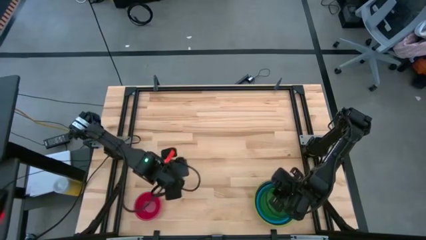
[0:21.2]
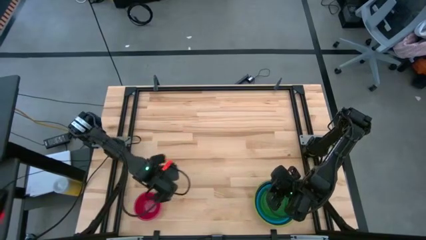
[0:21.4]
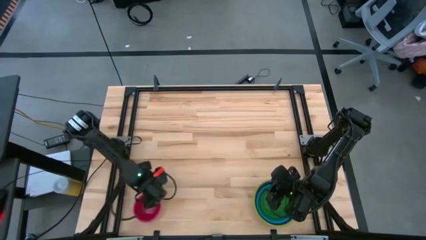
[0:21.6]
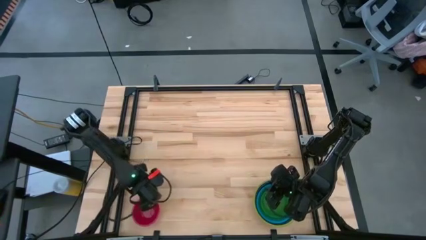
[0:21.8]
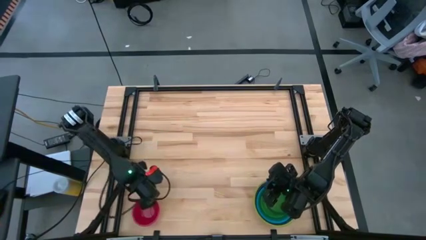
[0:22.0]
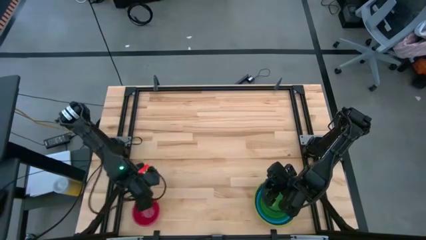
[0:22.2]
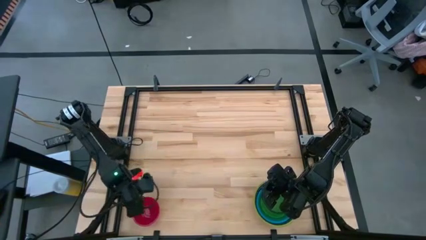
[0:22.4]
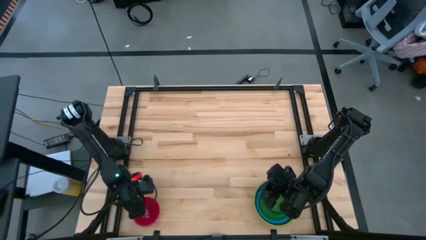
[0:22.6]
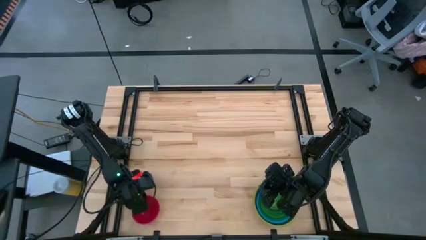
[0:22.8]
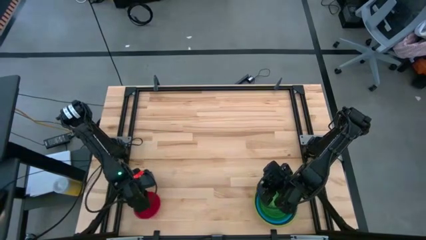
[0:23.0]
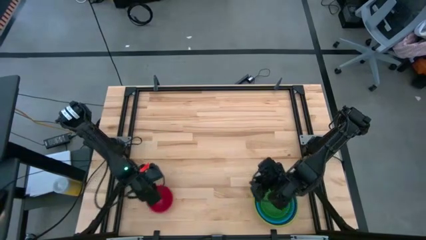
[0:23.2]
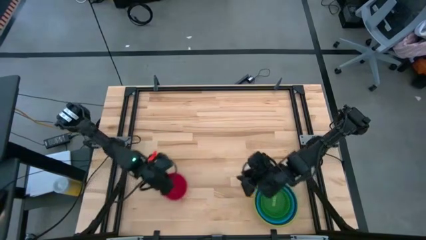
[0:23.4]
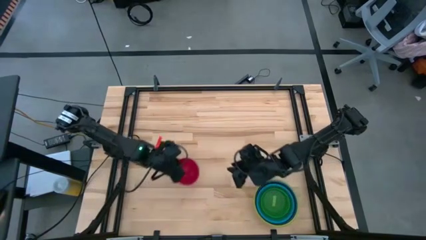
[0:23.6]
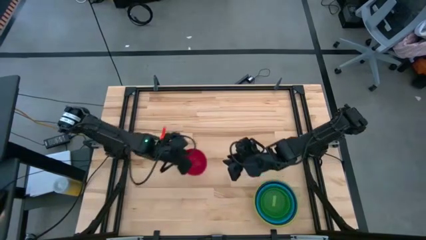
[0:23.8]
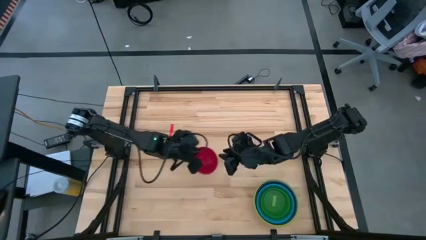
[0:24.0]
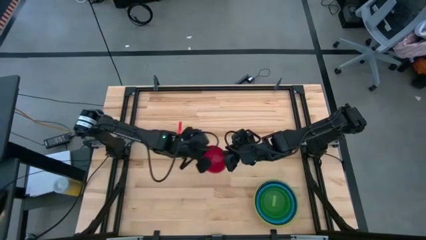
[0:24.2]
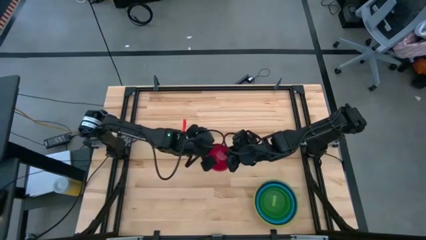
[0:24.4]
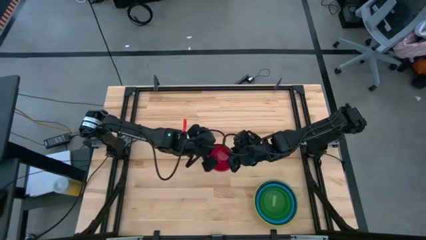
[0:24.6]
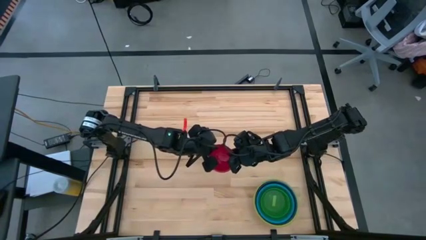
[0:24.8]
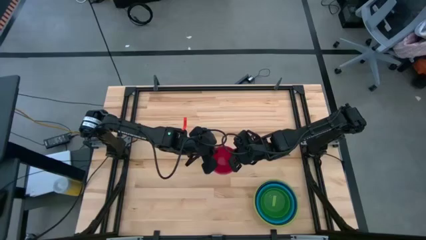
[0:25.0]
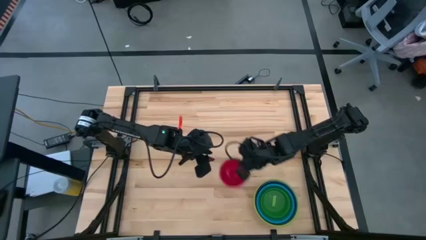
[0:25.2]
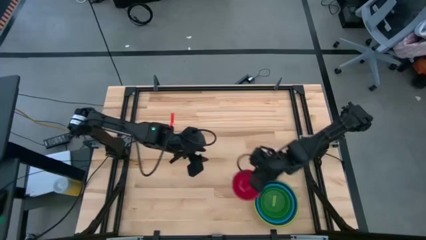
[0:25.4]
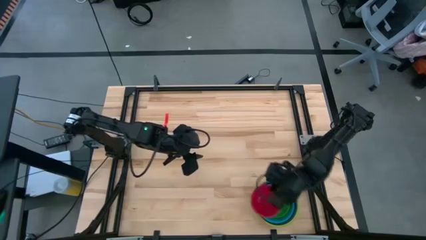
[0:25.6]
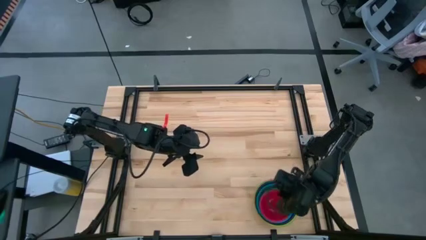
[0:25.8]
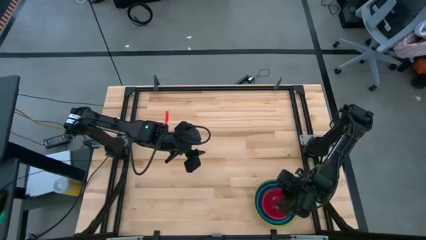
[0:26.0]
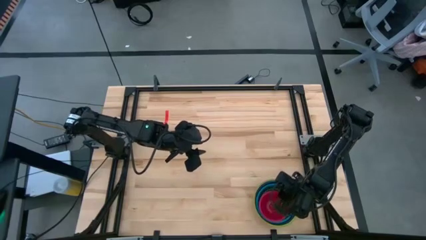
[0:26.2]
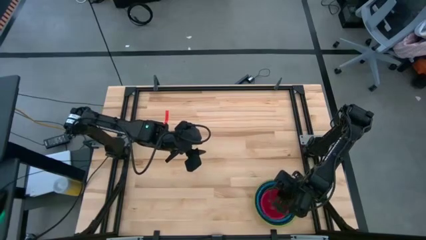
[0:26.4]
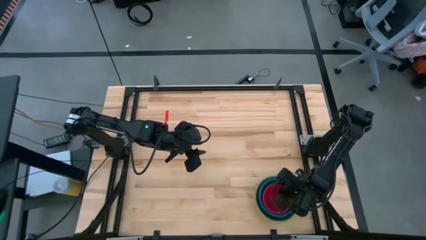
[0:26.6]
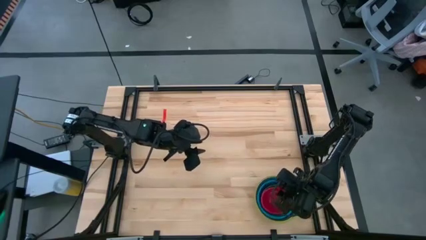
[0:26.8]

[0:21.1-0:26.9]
Stack the red bowl on top of the green bowl

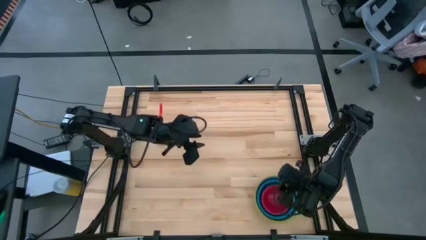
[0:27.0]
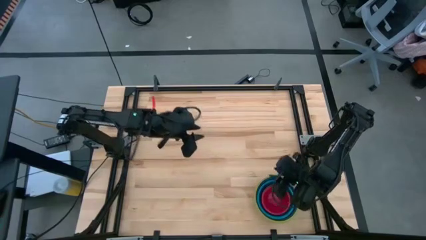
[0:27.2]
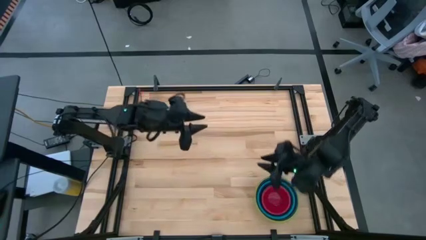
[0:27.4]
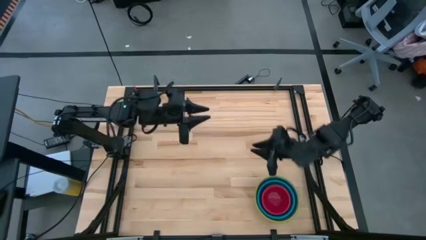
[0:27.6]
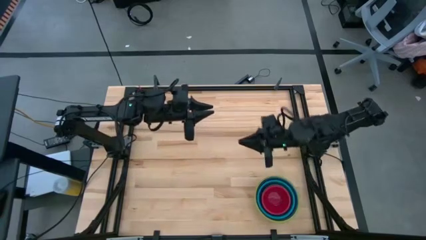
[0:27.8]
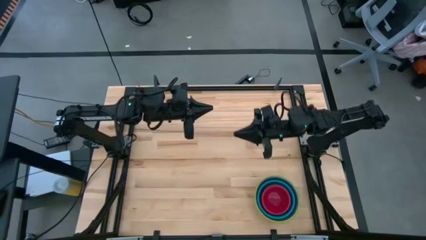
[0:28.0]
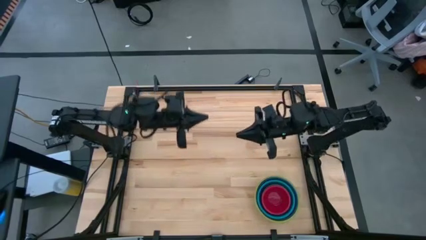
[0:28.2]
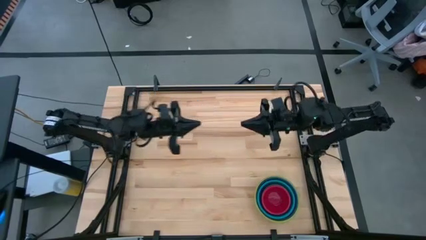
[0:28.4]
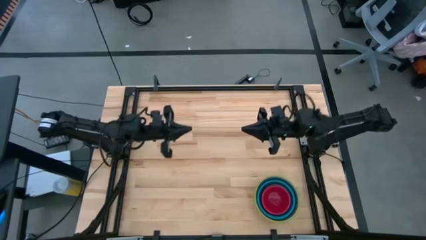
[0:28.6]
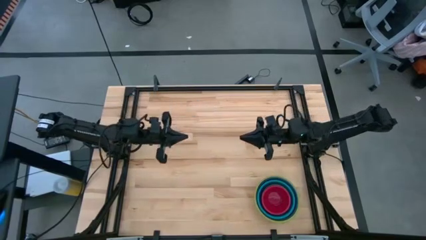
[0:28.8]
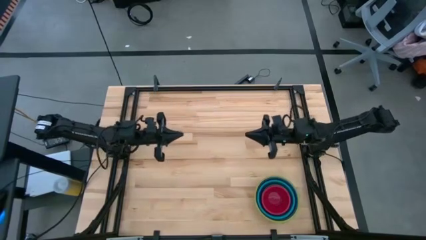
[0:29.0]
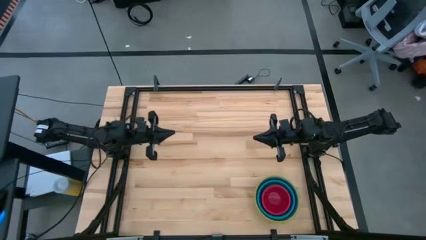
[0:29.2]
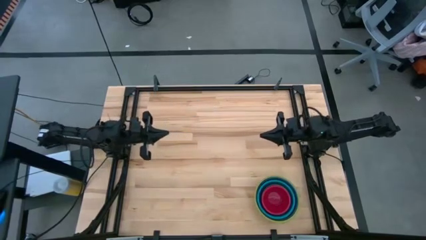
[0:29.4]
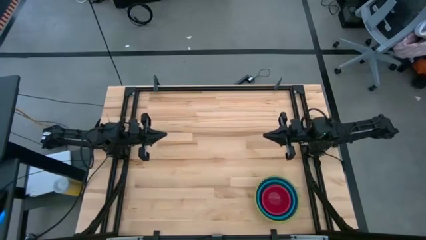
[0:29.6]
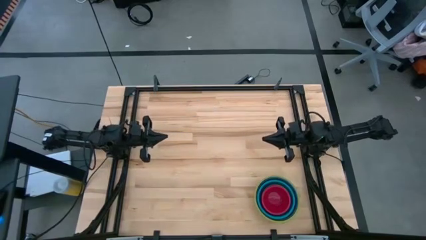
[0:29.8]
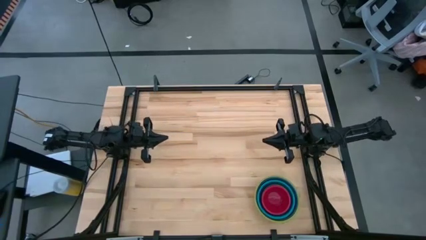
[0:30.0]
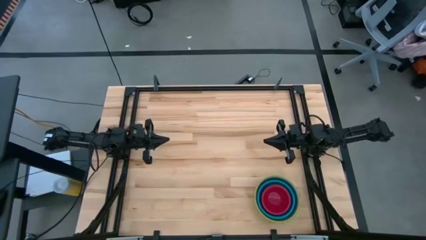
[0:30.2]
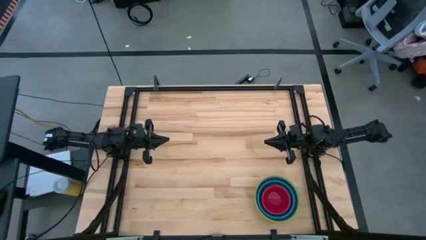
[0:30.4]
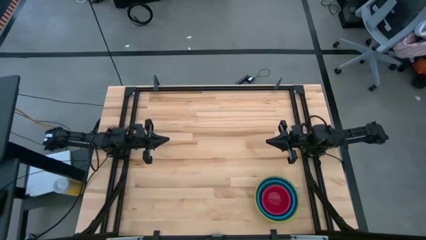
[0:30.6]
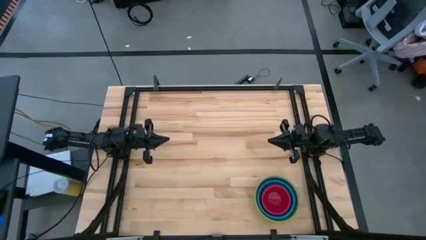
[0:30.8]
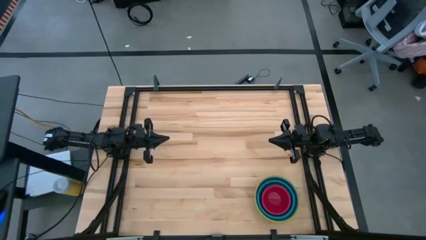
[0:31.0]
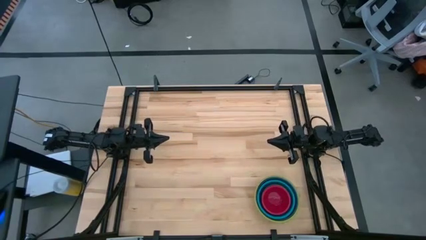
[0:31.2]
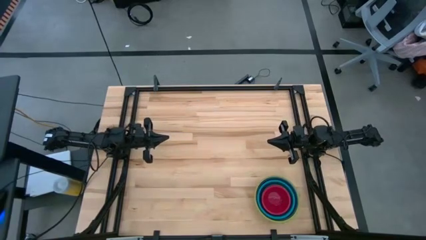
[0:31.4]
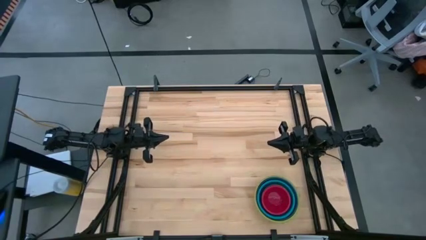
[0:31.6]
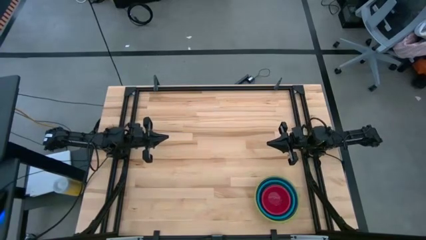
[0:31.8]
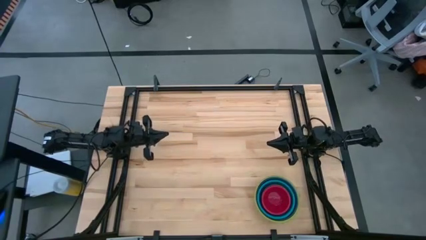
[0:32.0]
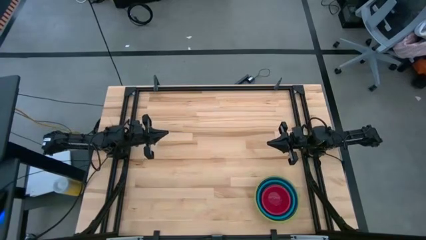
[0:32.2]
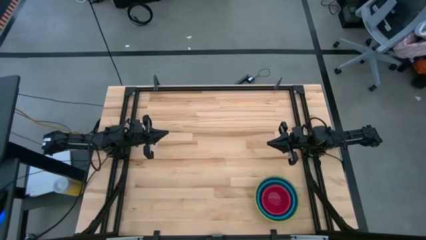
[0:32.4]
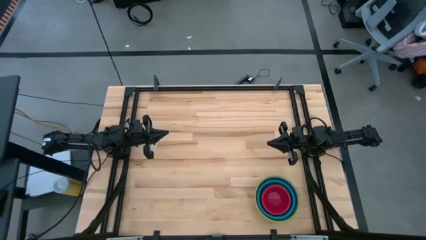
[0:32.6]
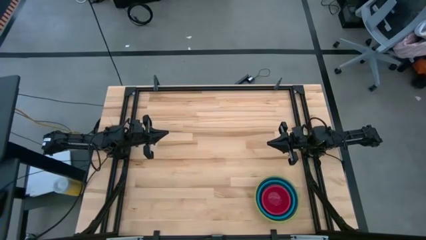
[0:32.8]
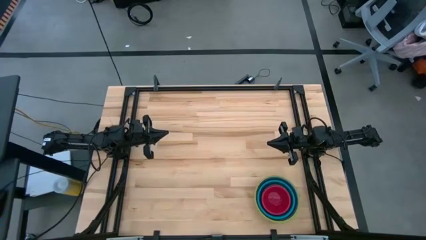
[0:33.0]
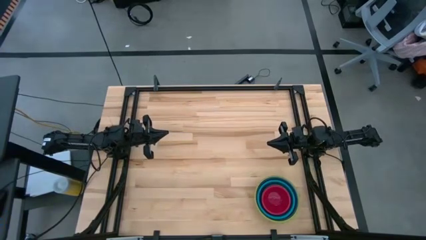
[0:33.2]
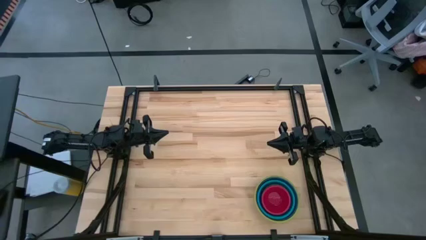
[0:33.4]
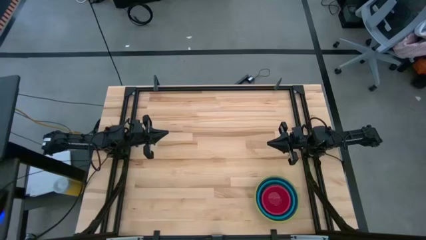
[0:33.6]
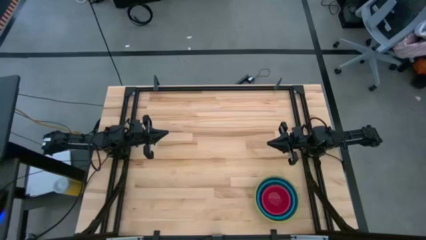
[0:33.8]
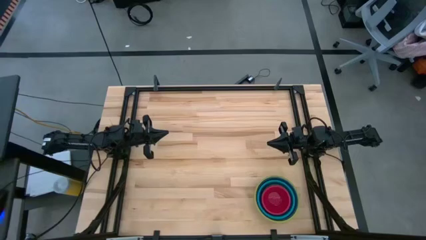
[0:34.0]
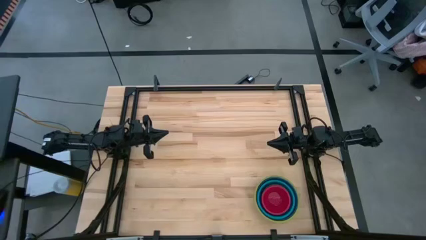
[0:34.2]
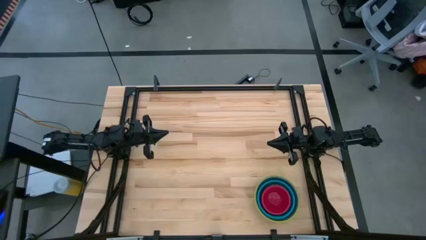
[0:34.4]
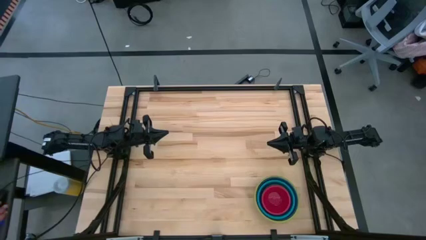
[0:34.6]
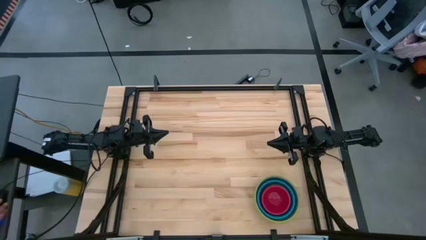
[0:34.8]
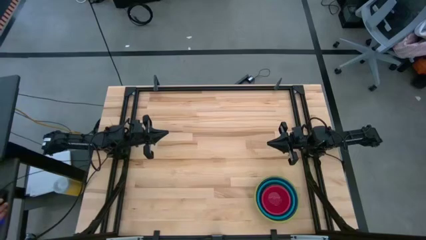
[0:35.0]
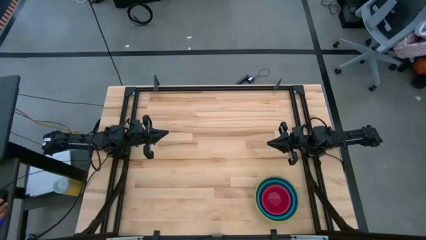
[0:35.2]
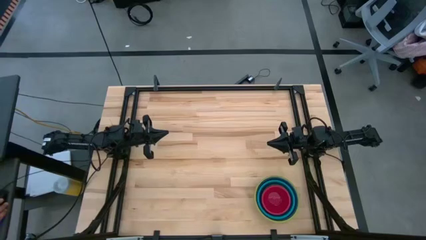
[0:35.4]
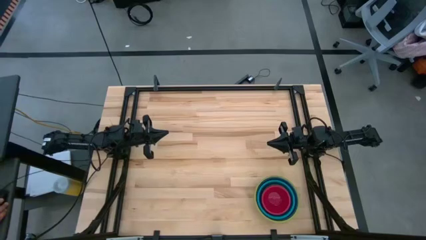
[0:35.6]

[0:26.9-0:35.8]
Return to Home Position
